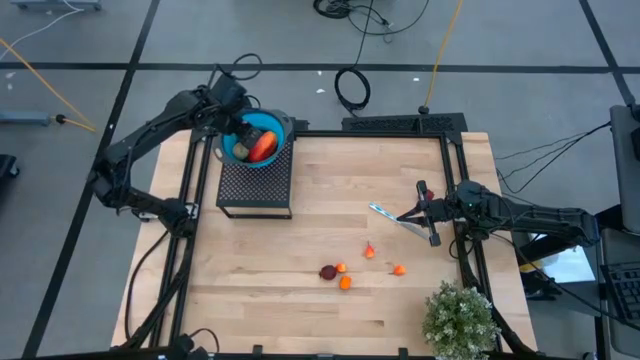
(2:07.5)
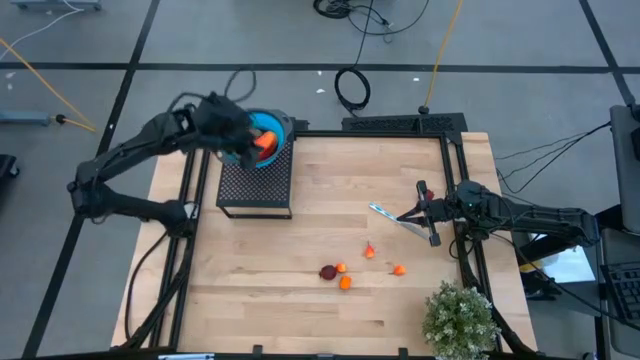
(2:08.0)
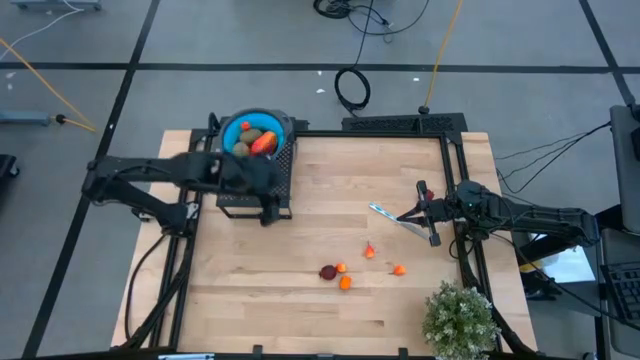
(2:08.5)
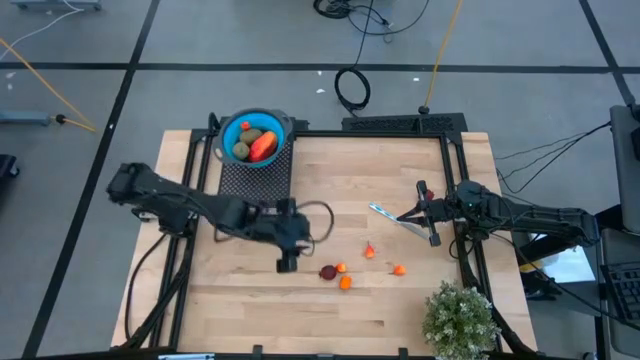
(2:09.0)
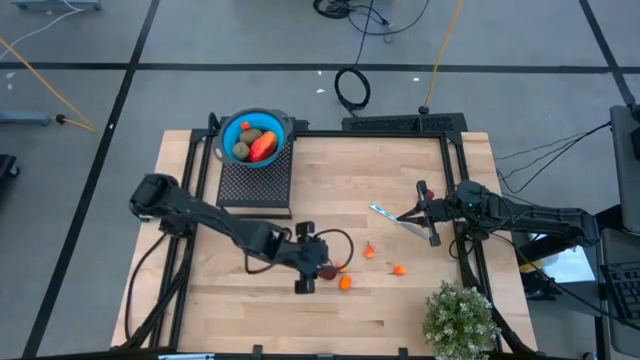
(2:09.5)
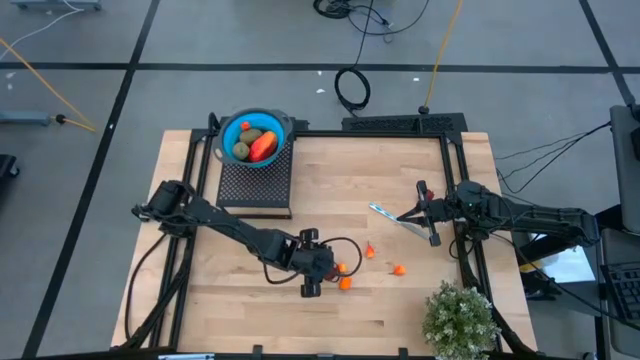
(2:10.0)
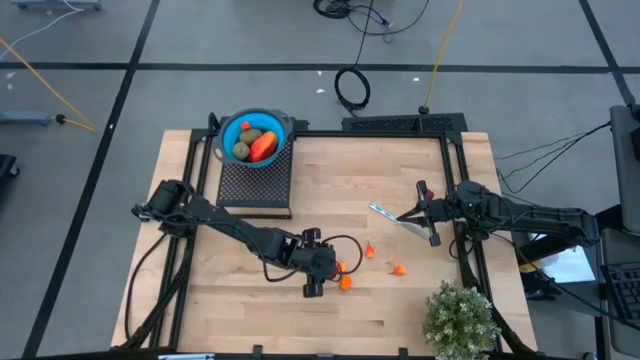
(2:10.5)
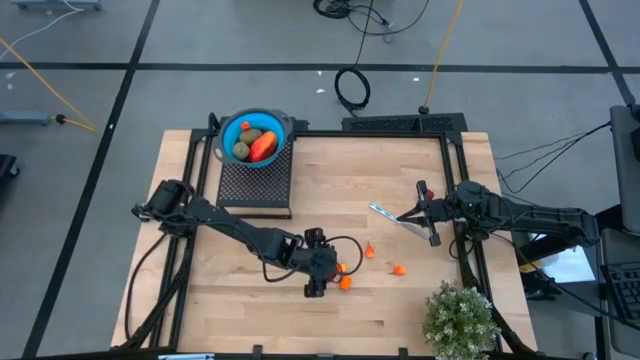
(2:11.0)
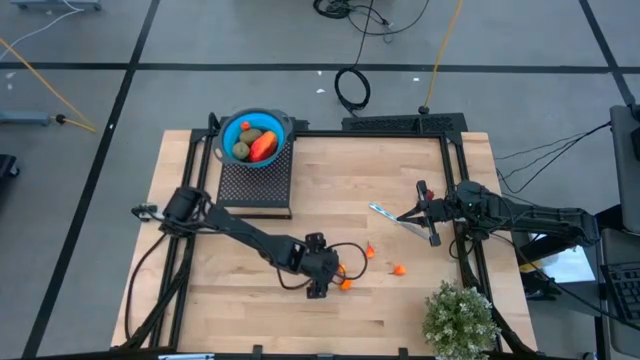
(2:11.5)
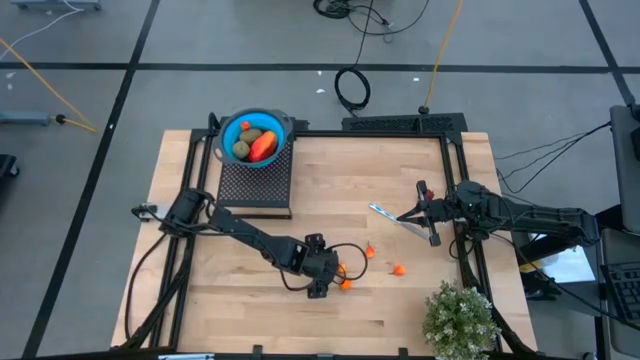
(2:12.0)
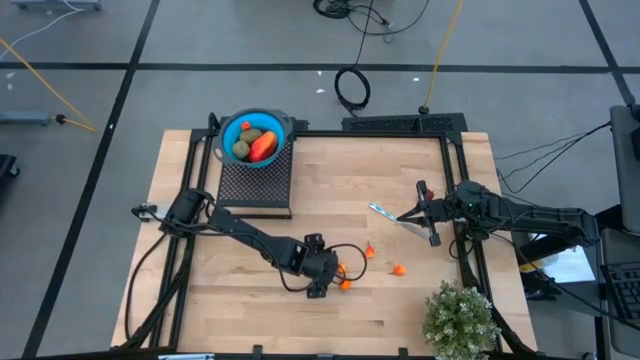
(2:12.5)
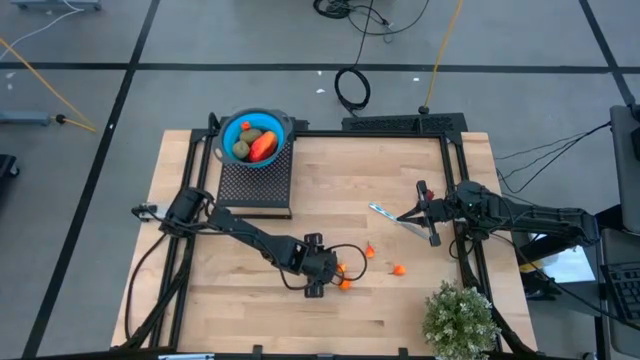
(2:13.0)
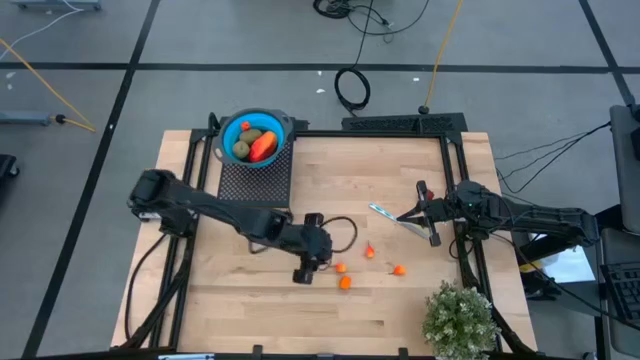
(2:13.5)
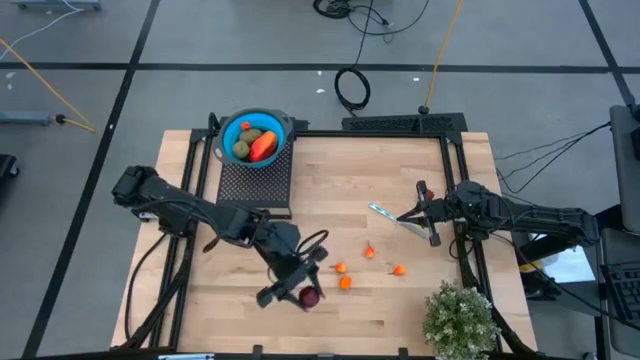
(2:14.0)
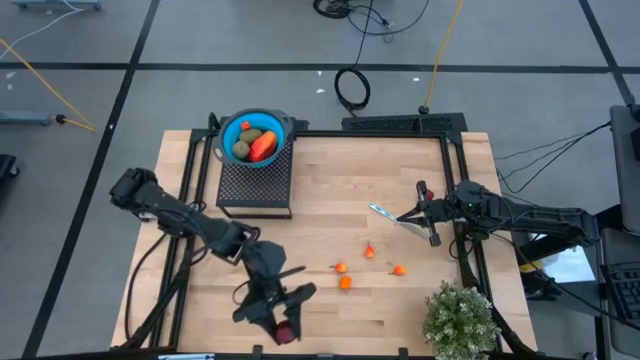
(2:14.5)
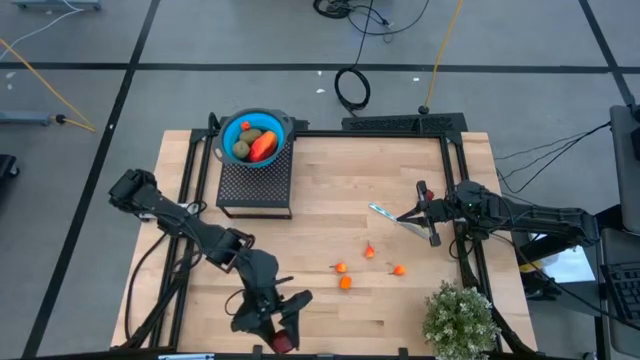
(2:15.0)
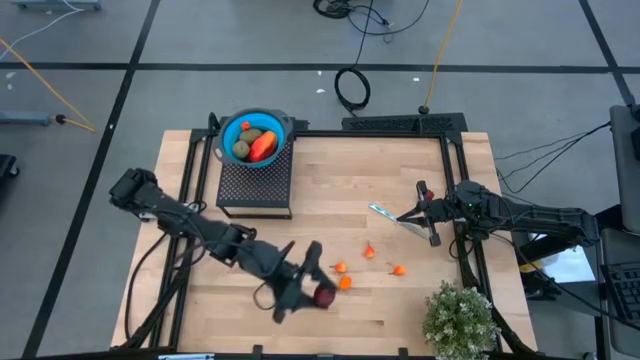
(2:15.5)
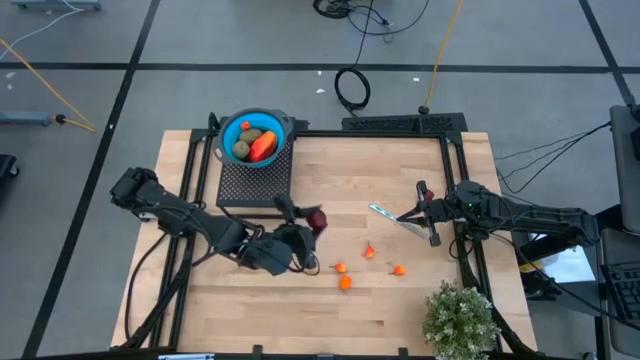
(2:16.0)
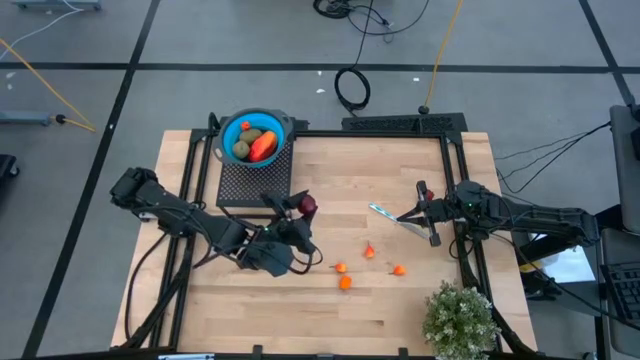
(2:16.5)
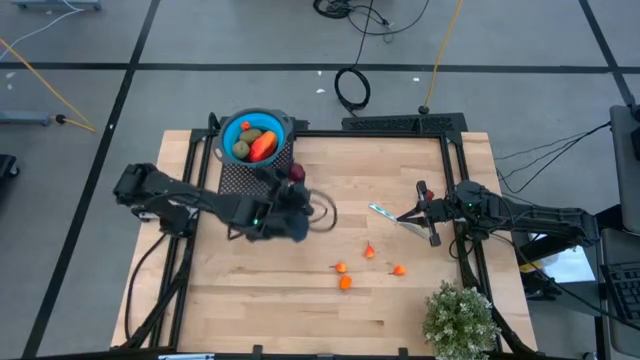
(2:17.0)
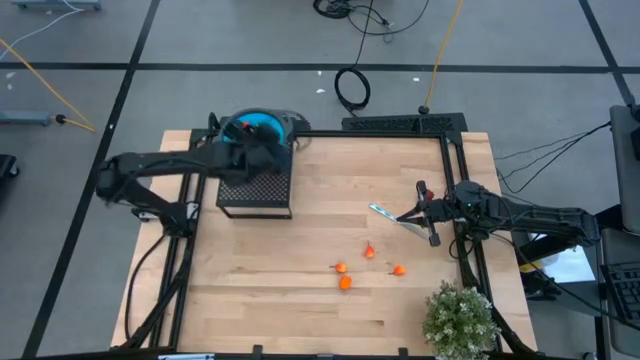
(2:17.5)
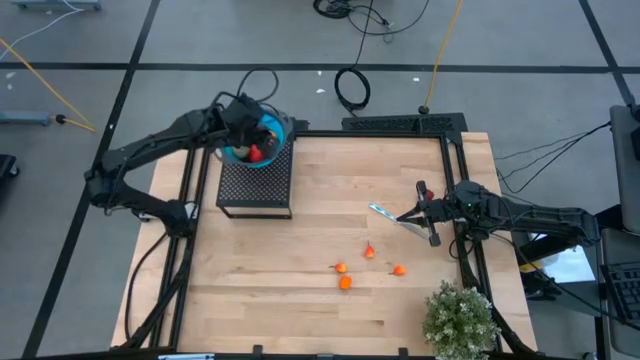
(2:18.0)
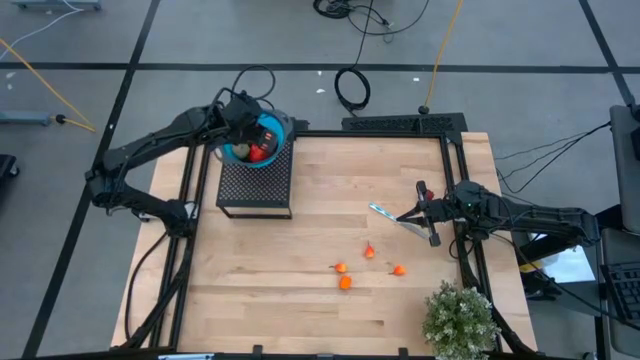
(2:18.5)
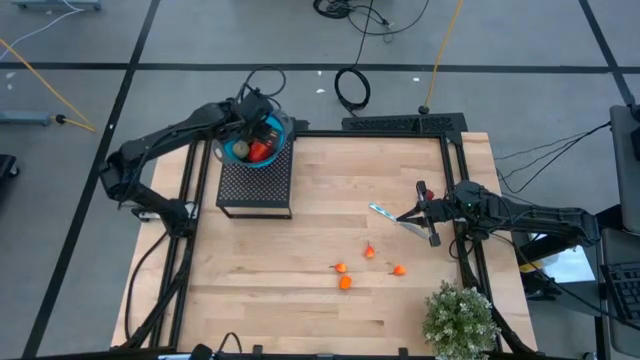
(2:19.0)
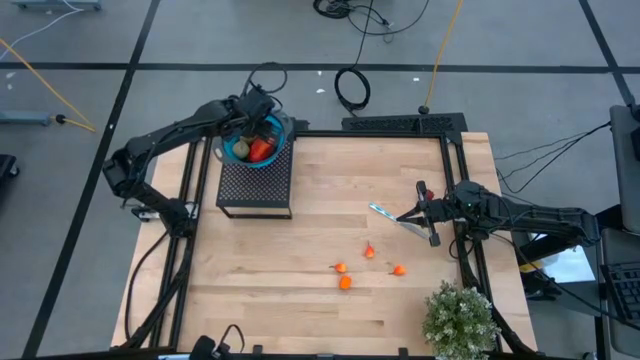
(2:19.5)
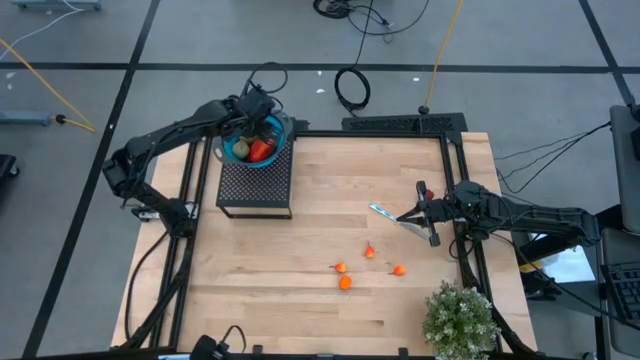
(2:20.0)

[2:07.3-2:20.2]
Task: Pick & Place Fruit
Put the pomegranate into the blue strainer bowl on the shelf

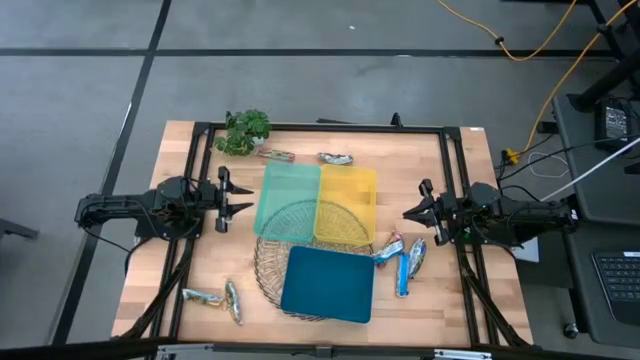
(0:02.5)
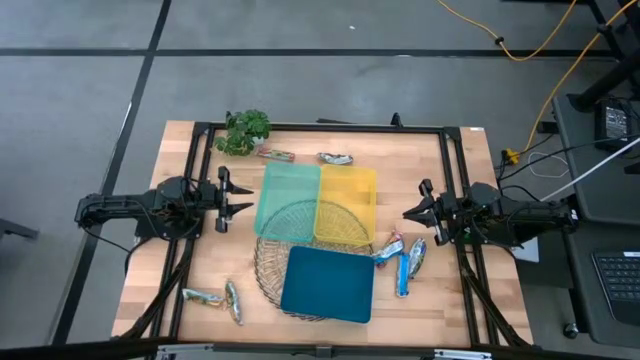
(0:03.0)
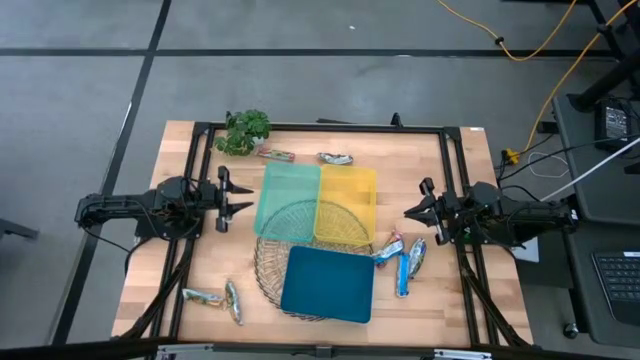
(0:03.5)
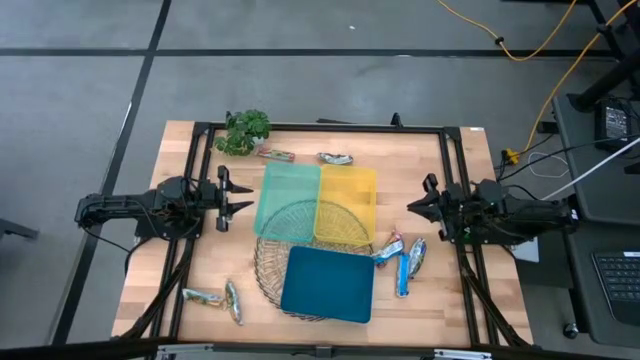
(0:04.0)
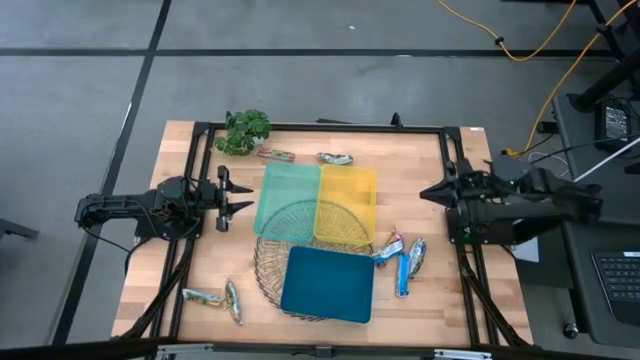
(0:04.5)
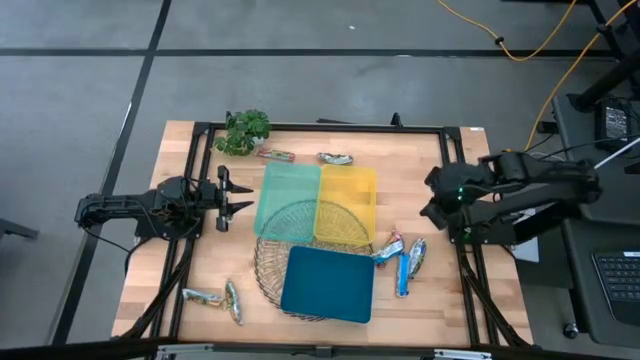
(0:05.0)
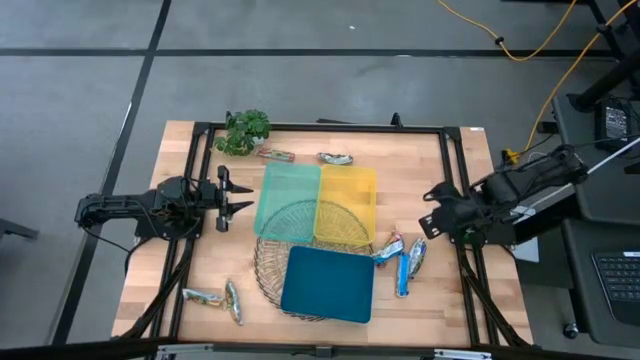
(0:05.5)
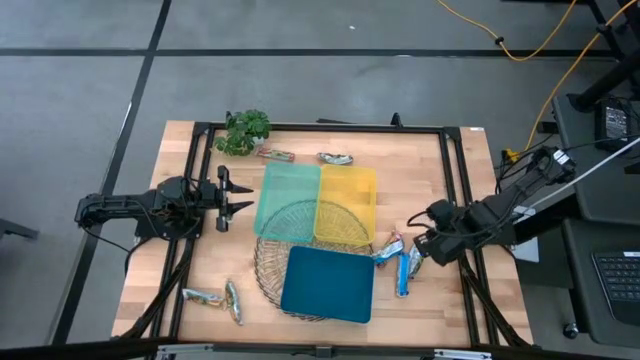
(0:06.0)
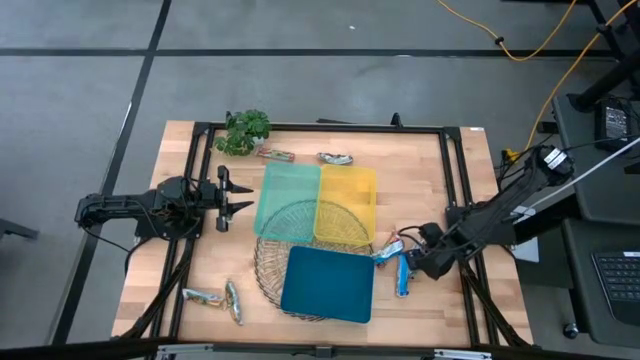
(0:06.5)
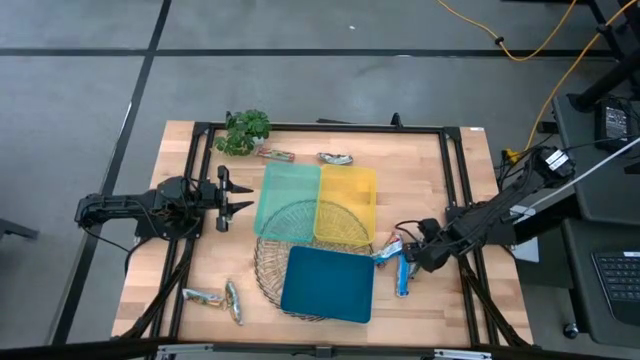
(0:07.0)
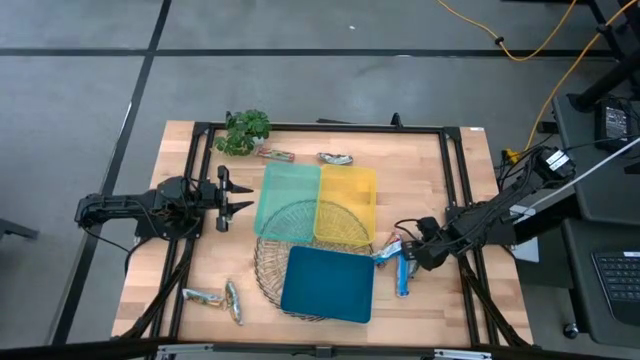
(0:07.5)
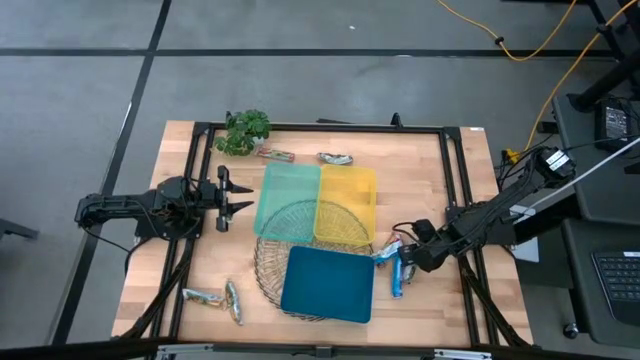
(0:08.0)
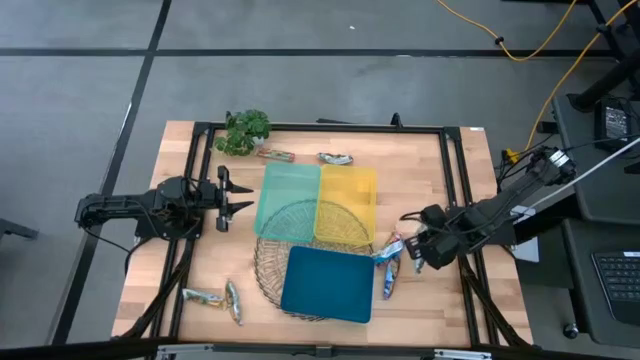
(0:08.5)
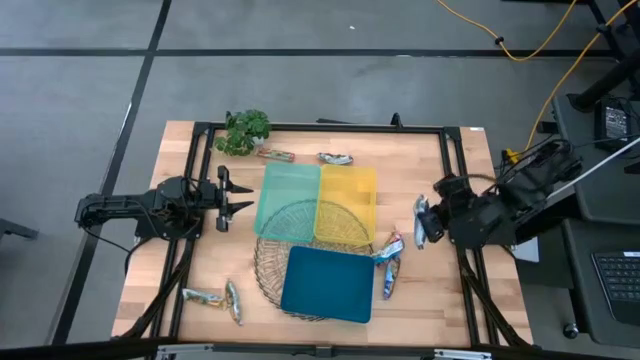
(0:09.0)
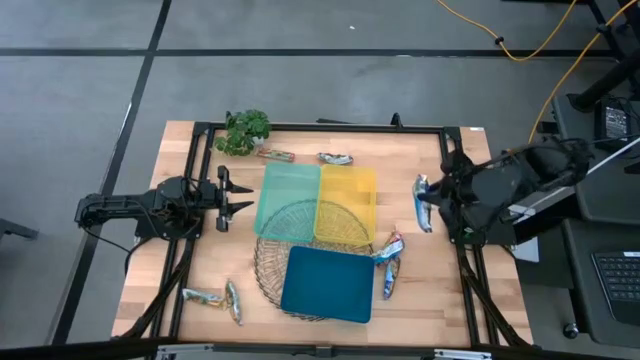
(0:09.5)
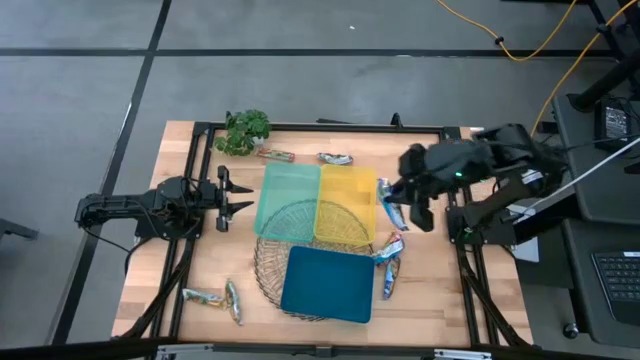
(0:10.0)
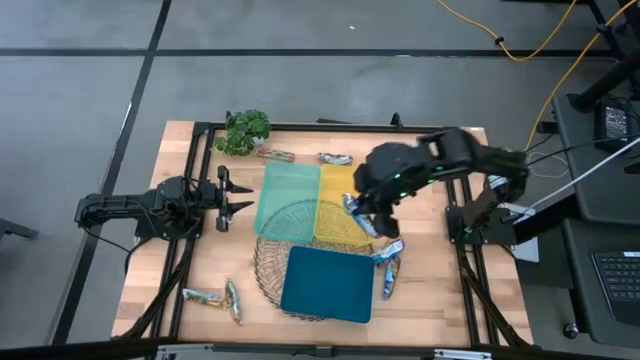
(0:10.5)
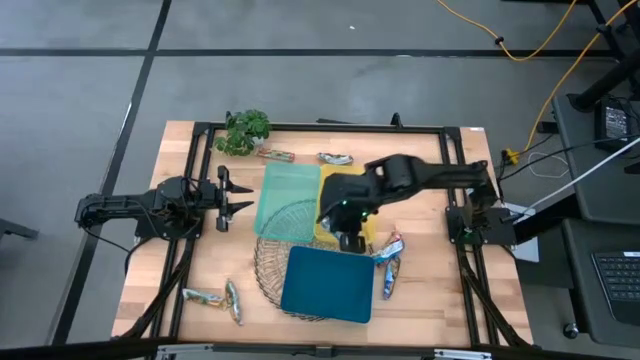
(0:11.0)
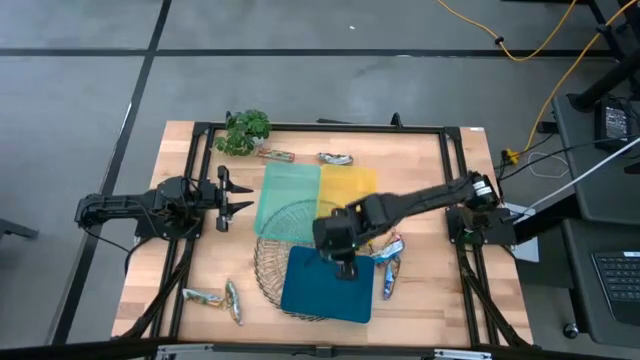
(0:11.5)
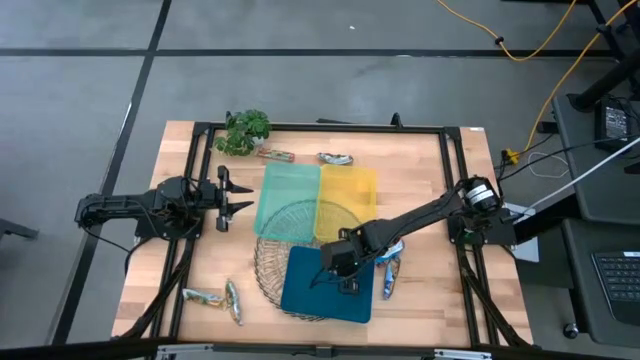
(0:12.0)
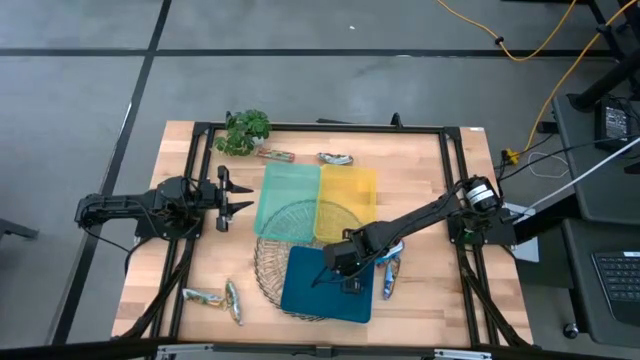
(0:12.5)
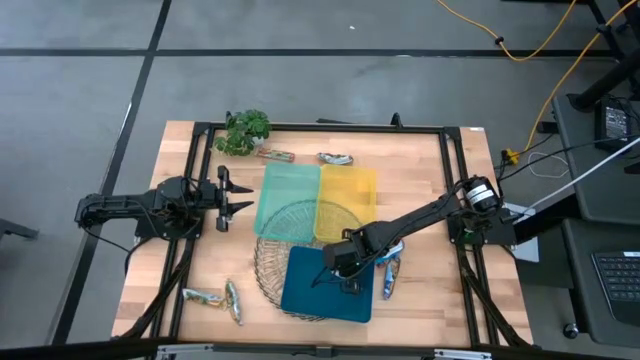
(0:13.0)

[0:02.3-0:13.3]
Task: Pick and place Granola Bars by type
Put the blue granola bar into the blue bin
